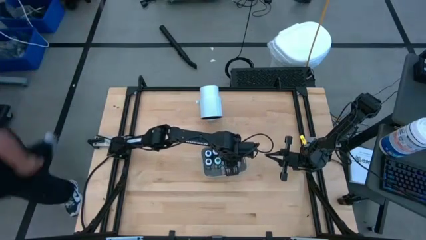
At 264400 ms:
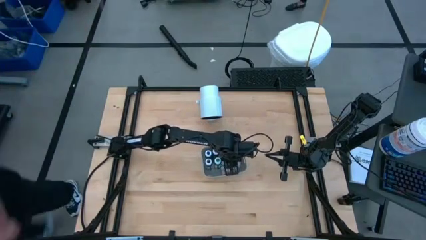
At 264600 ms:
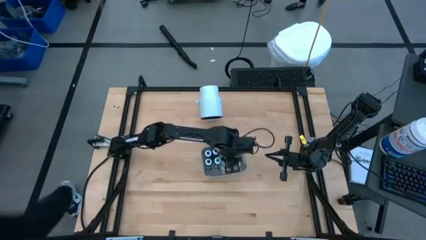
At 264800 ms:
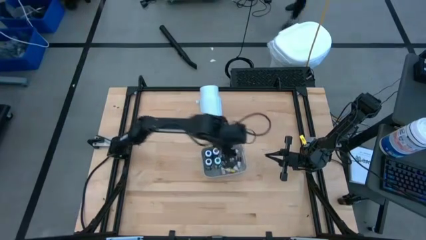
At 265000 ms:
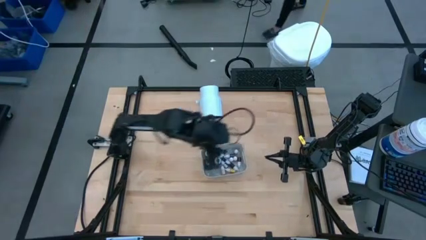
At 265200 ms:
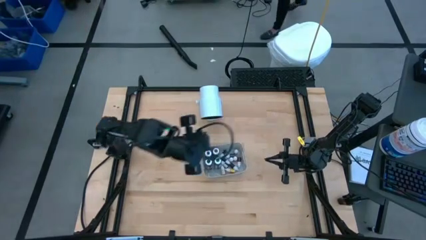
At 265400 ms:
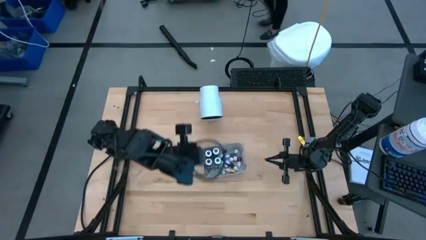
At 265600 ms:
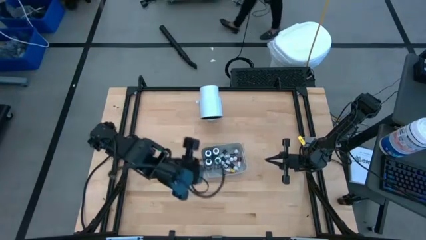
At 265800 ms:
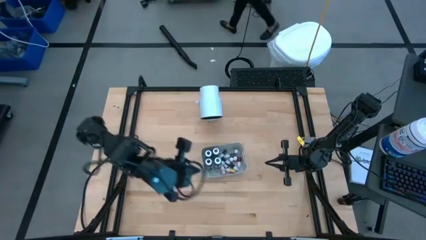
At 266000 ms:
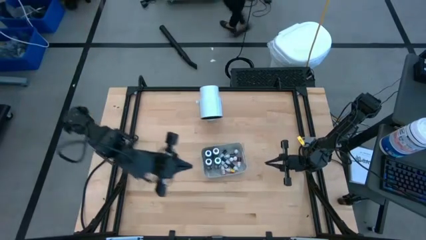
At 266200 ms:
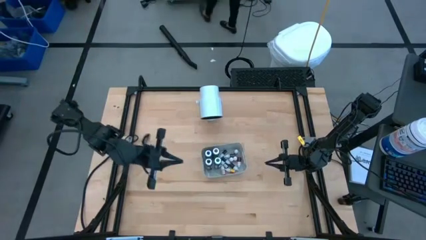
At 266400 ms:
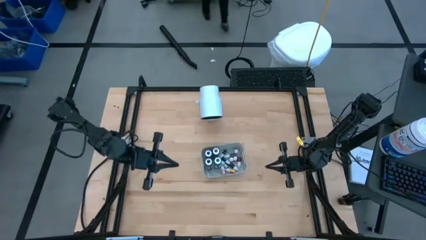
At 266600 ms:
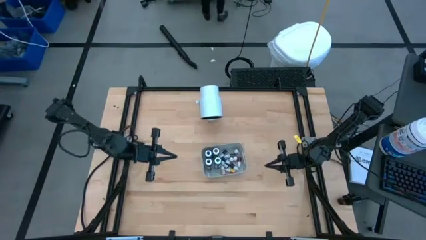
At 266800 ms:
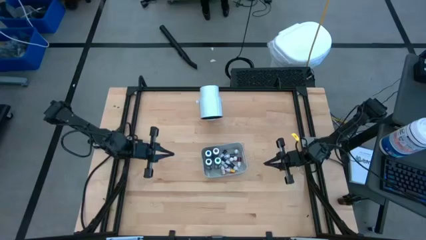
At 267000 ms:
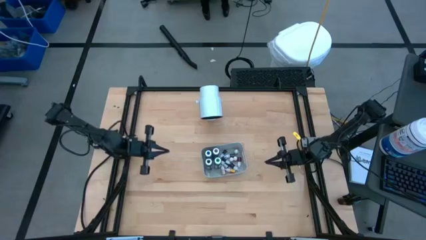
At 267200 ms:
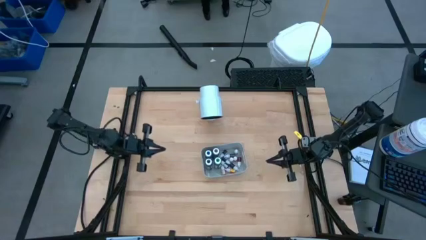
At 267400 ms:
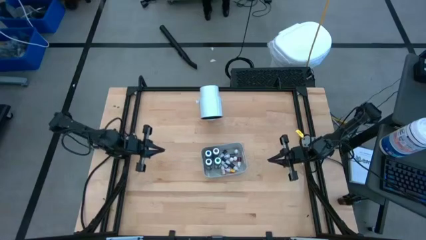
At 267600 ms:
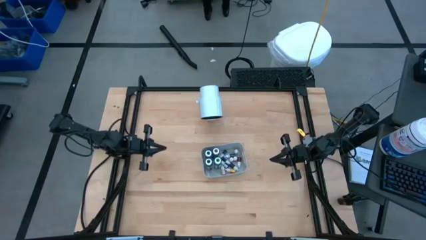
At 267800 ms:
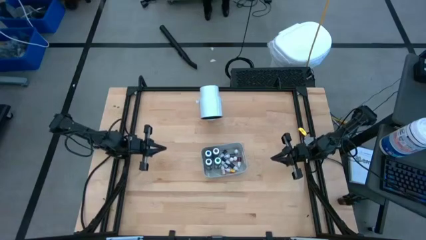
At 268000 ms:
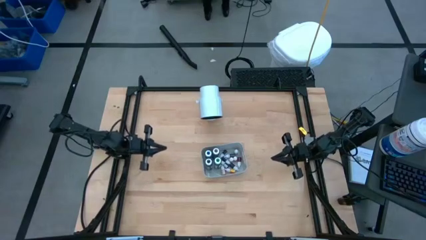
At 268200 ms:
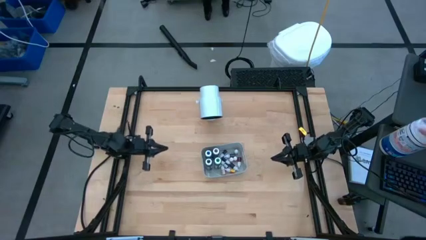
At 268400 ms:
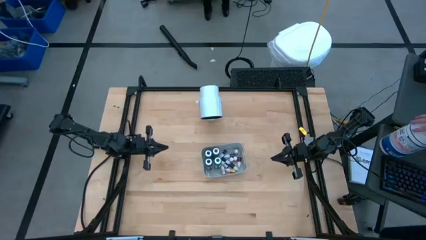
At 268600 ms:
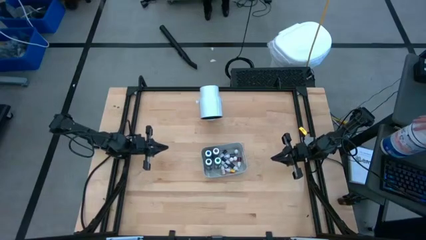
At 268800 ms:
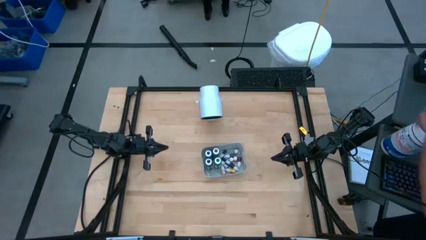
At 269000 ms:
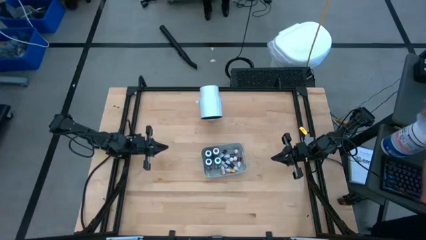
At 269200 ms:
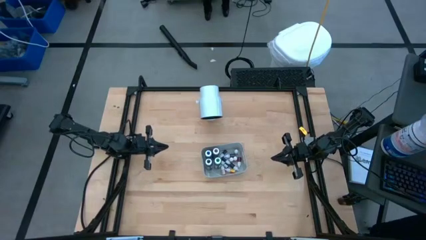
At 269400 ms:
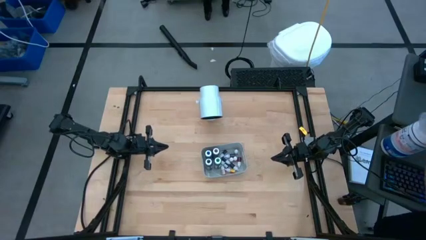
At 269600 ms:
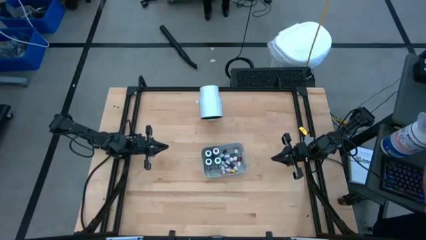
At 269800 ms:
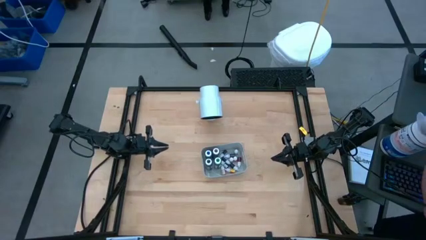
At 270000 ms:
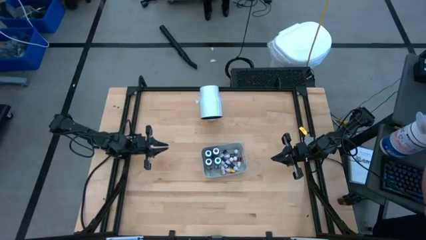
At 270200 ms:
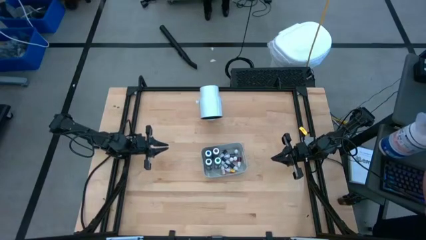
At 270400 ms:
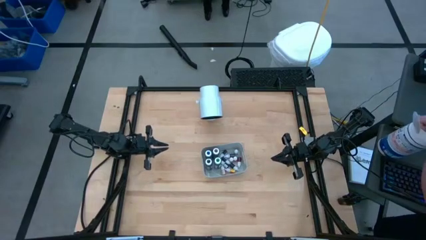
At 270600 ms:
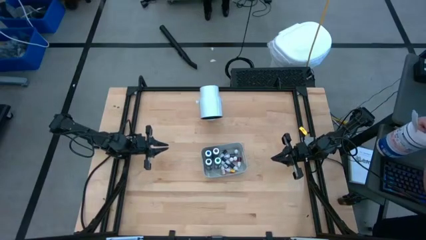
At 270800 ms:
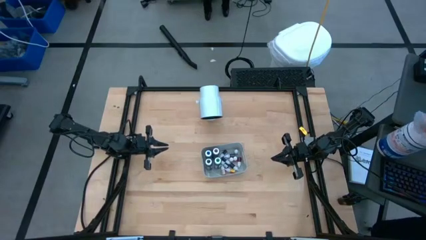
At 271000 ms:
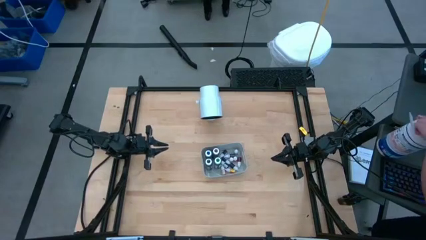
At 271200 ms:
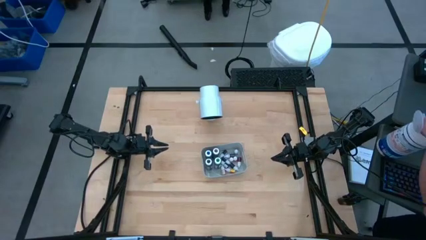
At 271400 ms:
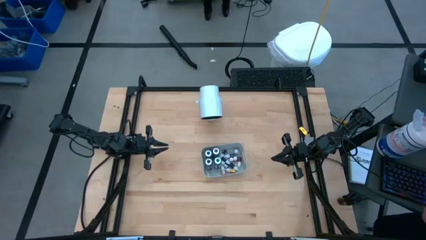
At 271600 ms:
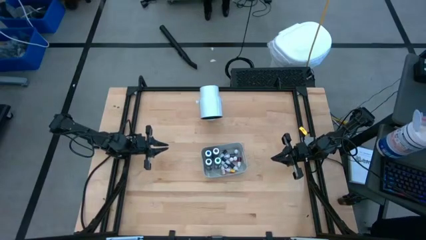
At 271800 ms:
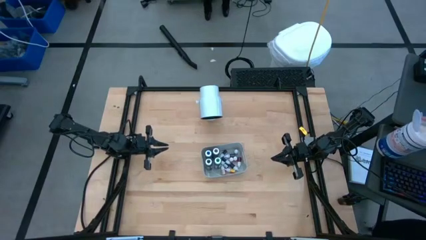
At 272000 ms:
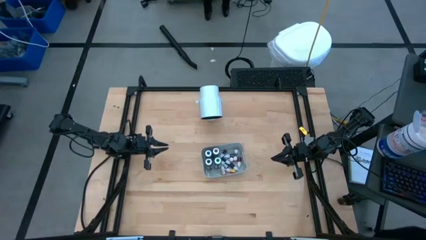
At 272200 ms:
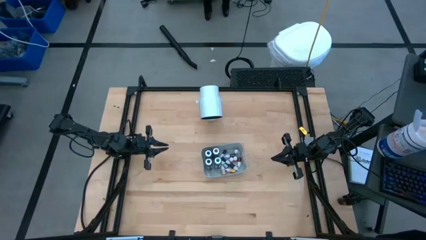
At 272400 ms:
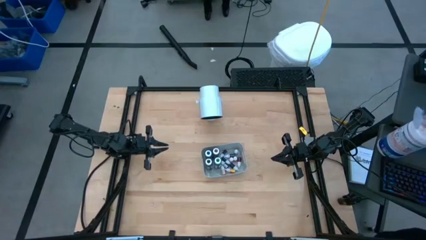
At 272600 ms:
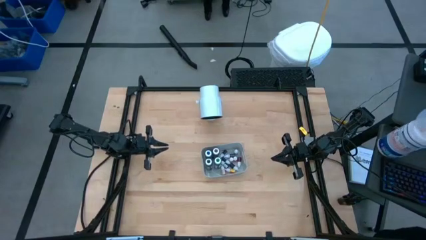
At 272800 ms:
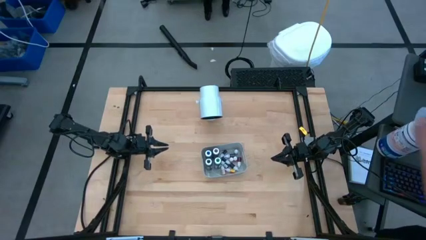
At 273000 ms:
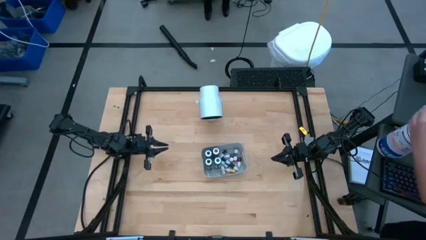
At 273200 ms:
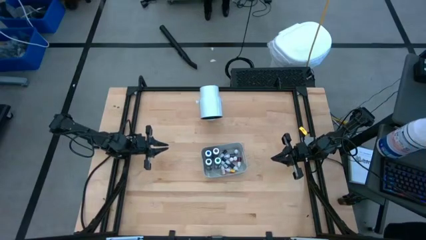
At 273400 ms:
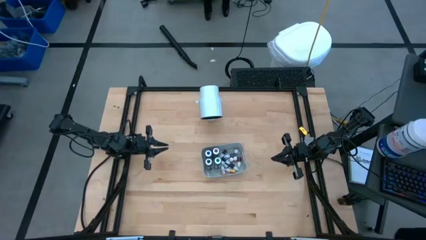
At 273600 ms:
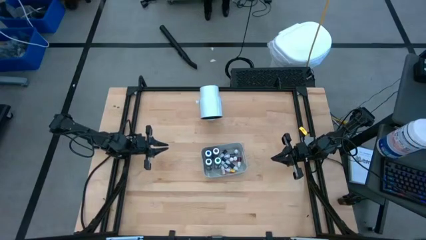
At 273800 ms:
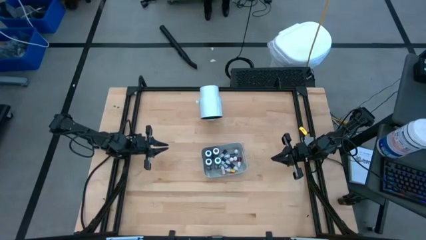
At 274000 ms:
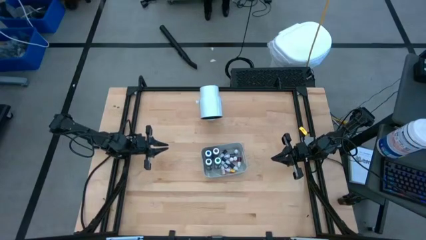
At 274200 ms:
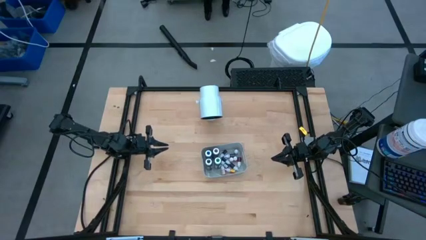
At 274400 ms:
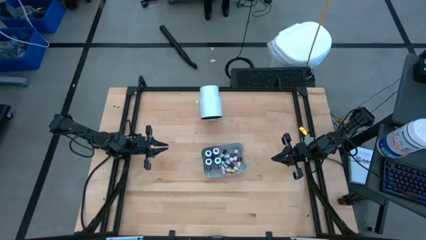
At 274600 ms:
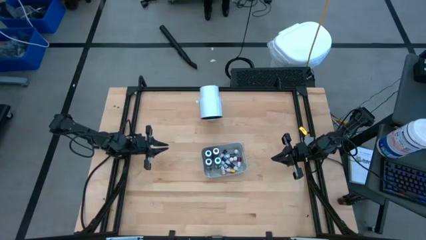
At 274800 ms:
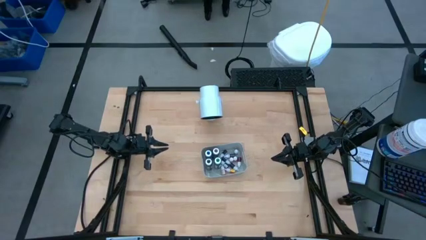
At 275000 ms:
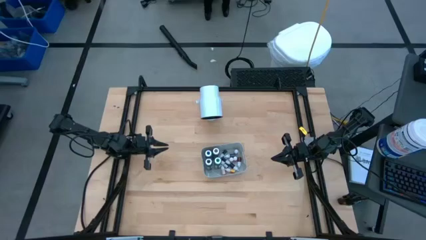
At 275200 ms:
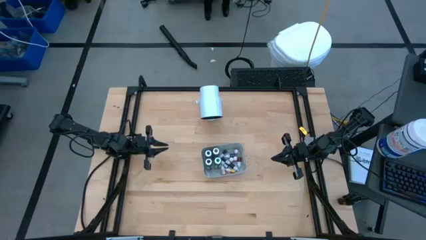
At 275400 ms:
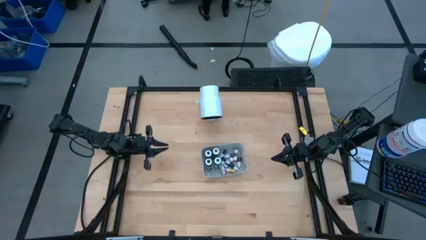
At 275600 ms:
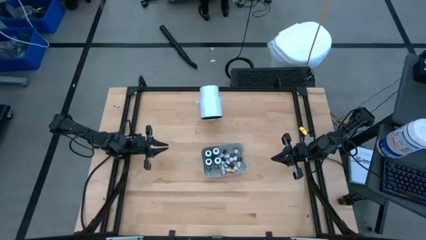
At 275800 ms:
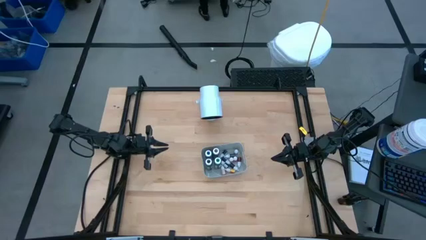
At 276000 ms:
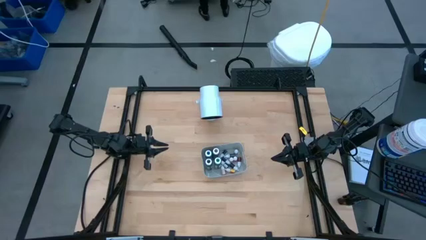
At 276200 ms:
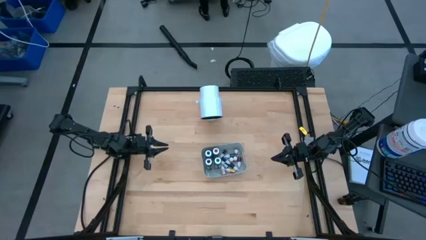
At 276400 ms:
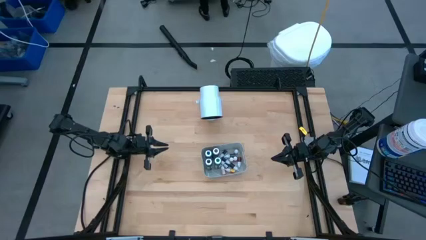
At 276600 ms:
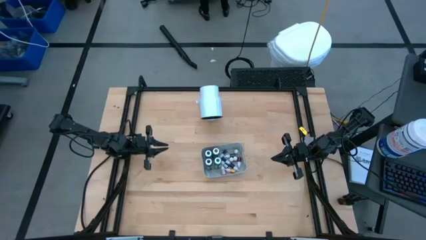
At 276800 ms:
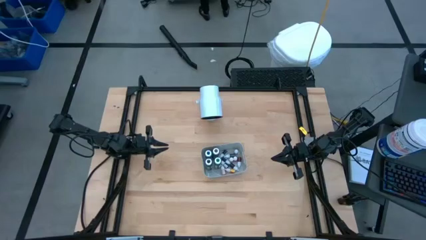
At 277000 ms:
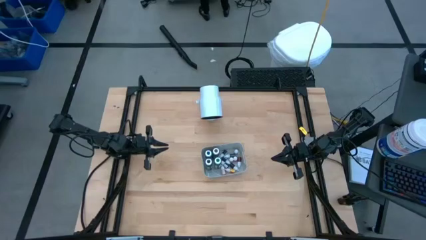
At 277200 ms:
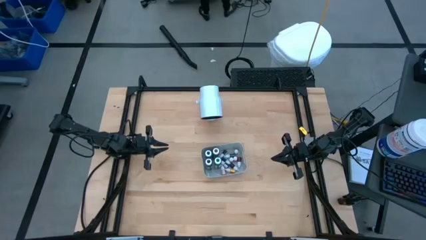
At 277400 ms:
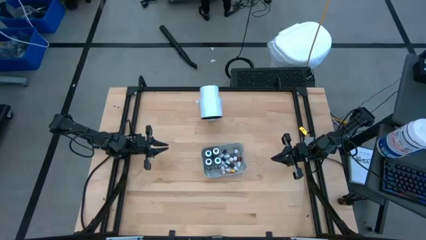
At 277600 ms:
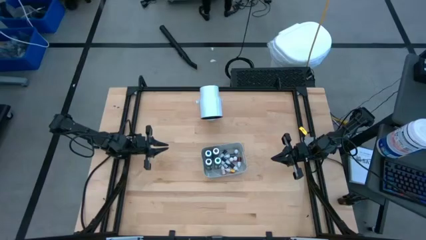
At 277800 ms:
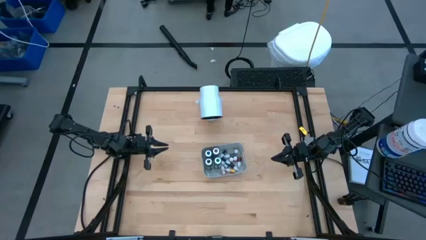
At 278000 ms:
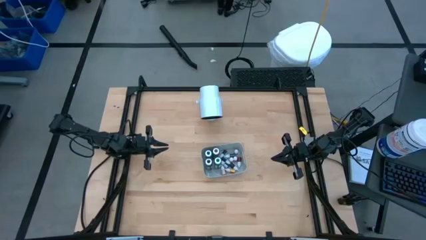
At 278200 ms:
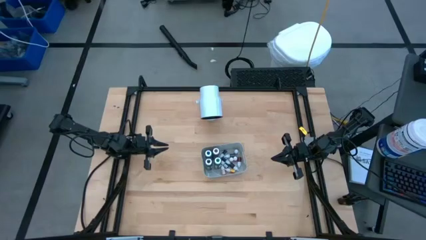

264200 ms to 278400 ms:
Task: Pick & Place food coloring
Return to Home Position
